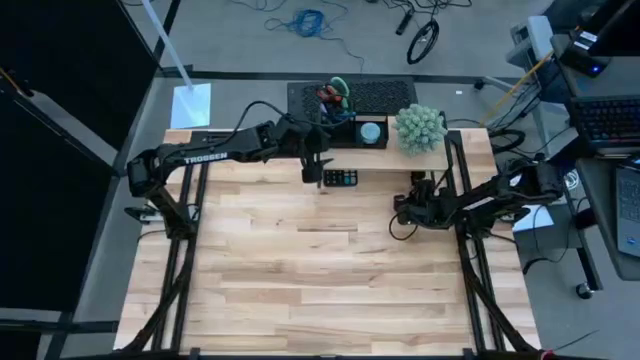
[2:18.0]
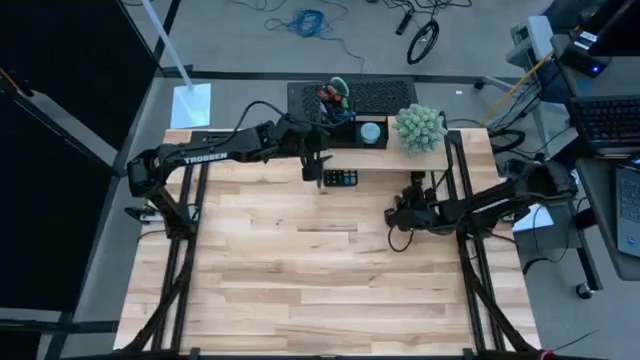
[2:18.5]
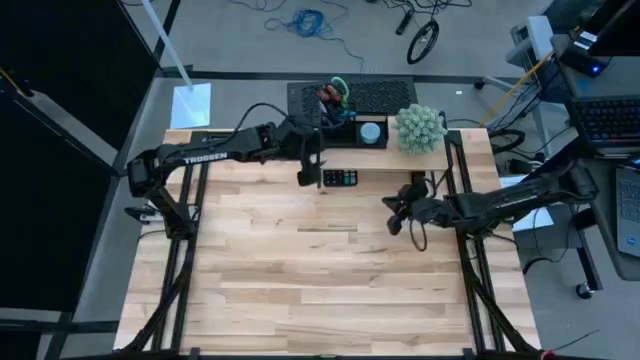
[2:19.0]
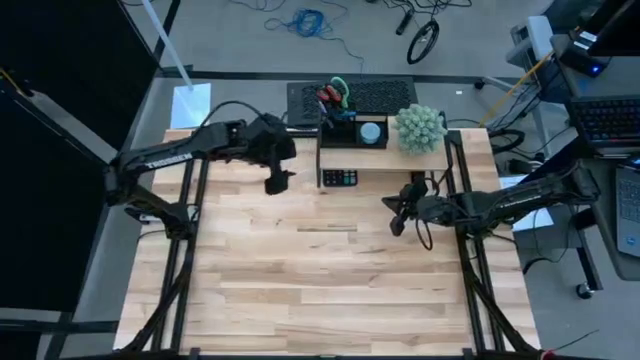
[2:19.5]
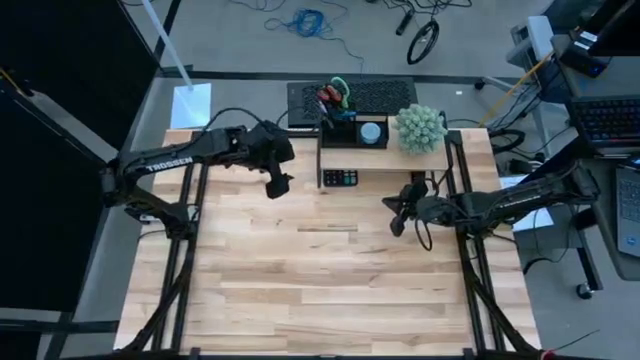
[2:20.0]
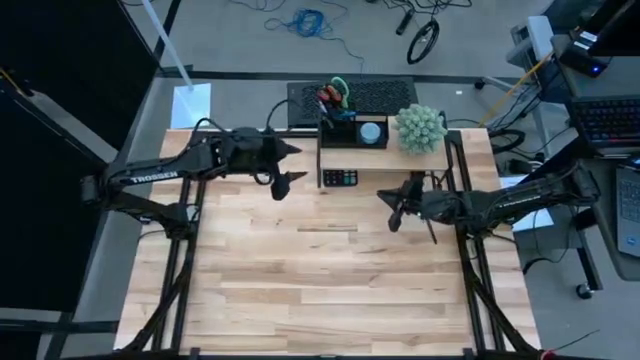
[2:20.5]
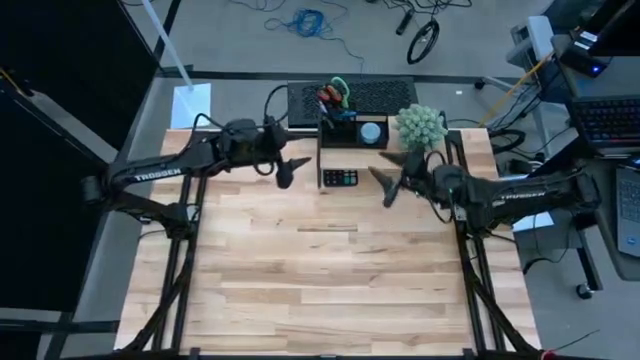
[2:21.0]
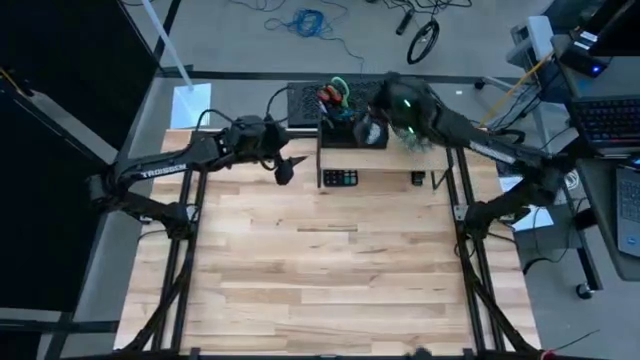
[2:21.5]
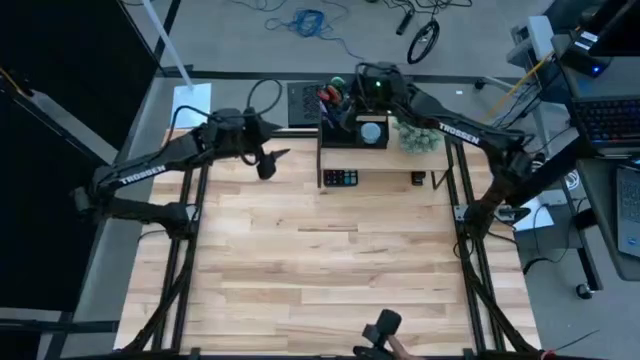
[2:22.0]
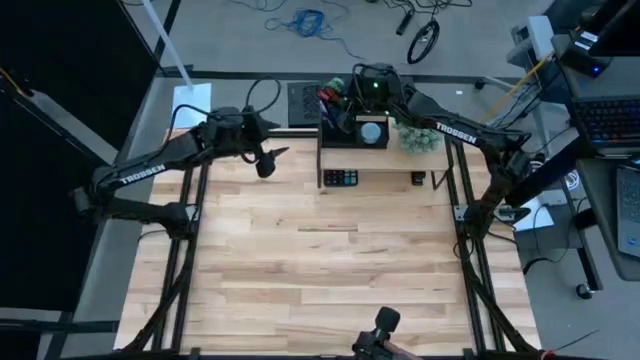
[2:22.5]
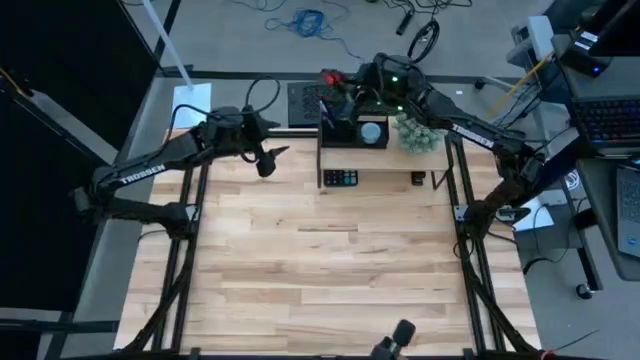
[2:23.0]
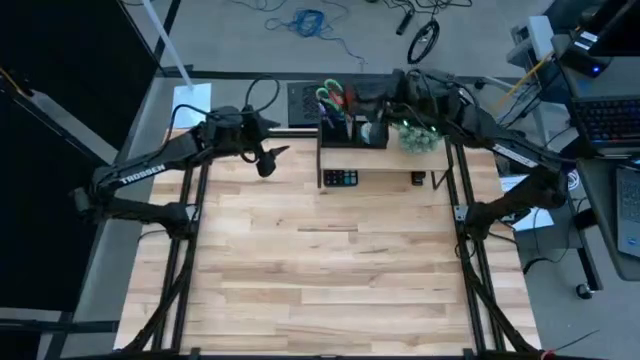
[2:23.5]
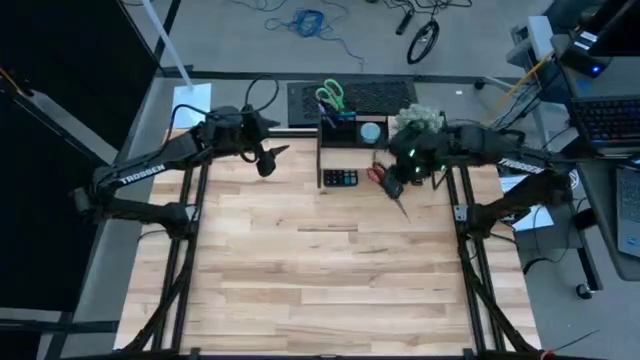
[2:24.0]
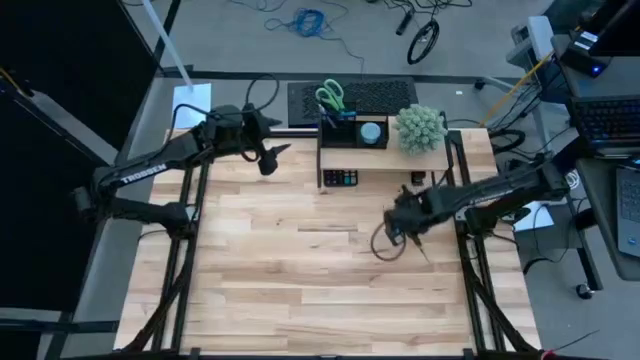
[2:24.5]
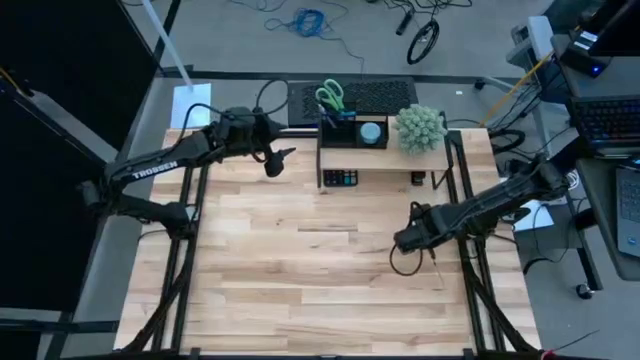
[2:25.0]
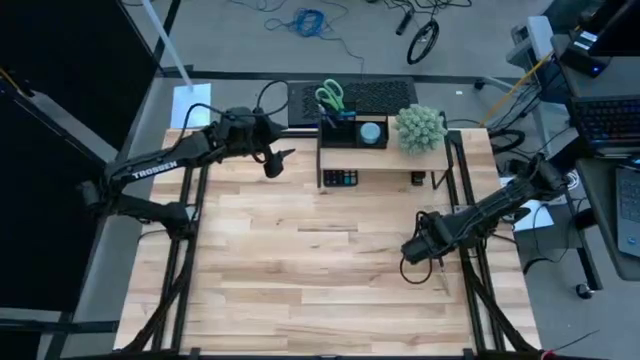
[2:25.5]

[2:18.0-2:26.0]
Task: Pick and place office supplies into organizer
Remove the black scissors from the desk organizer on the shelf

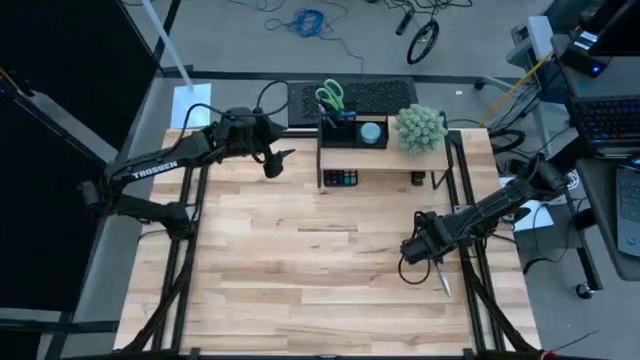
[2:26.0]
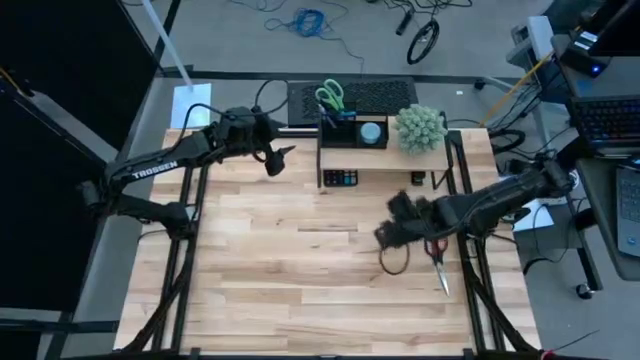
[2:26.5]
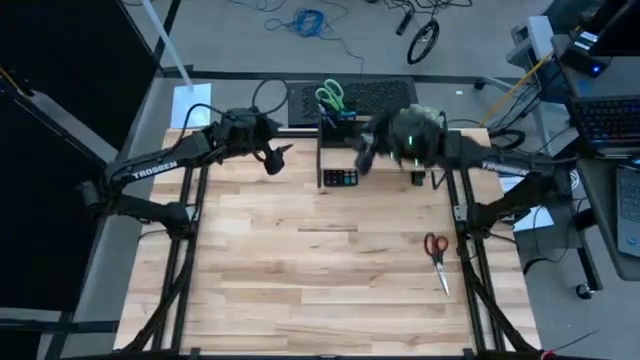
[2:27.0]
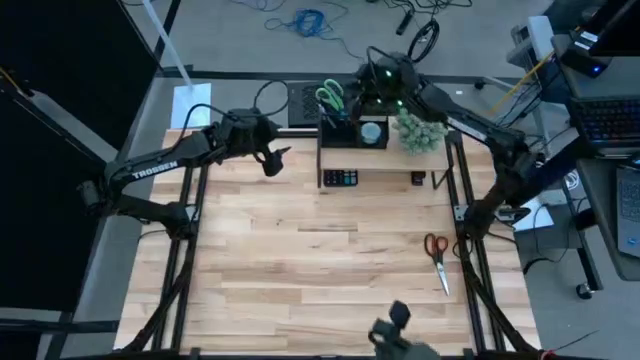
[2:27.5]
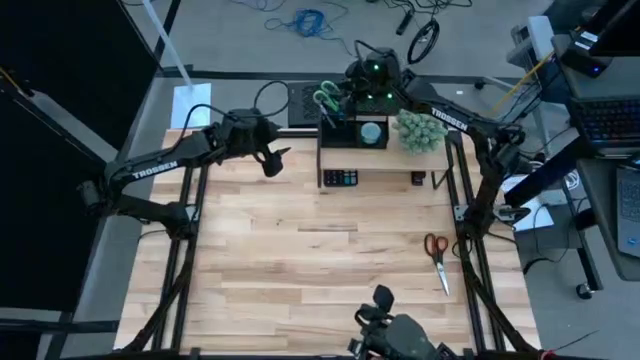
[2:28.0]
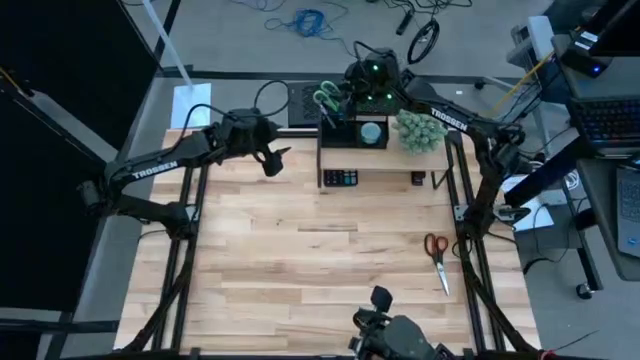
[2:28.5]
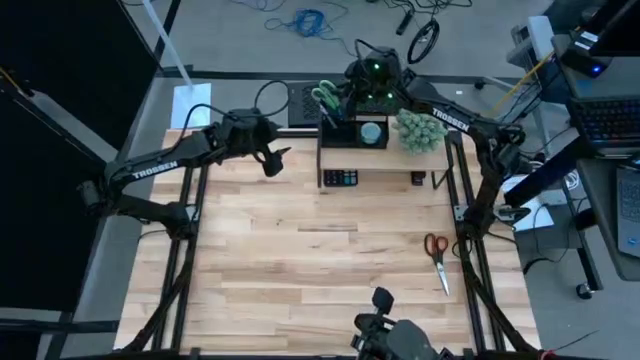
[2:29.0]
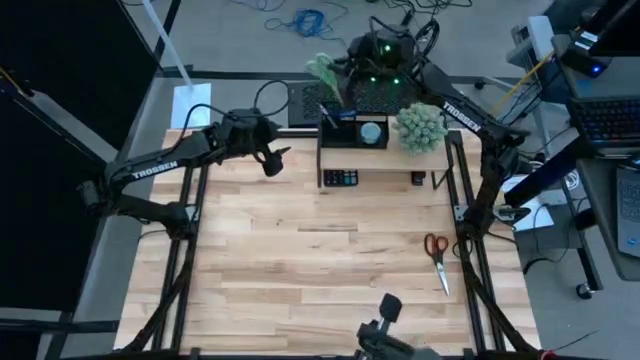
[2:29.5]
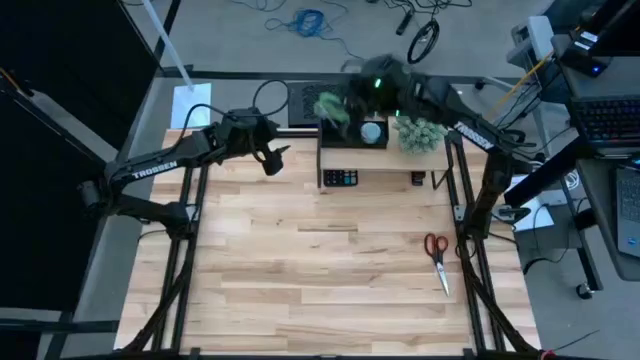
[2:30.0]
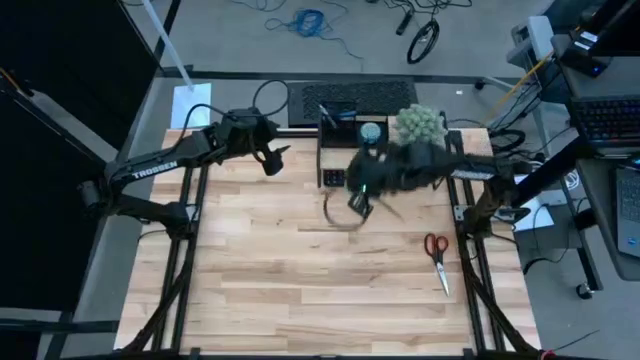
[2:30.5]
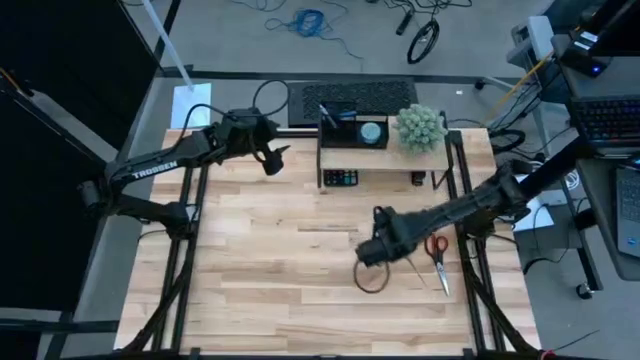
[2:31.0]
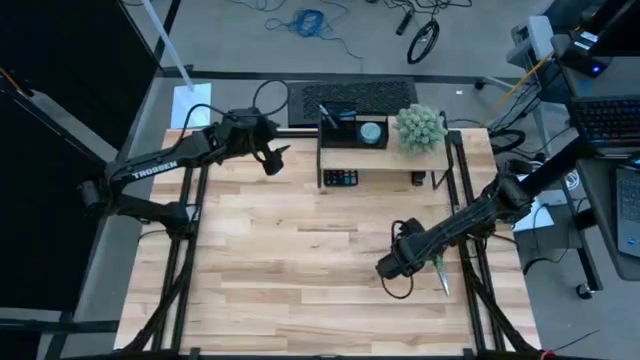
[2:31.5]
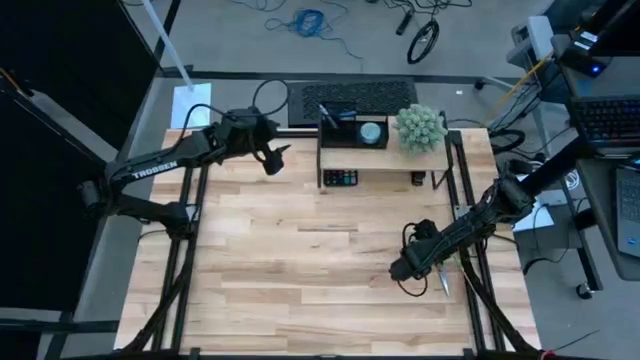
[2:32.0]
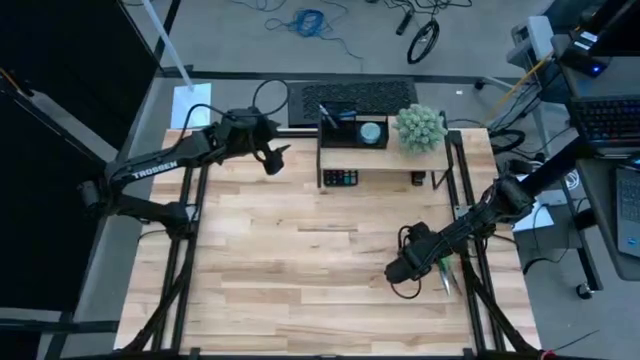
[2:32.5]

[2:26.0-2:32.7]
Remove the green scissors from the black desk organizer on the shelf

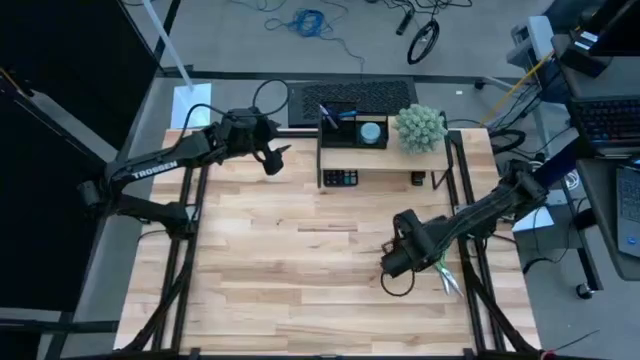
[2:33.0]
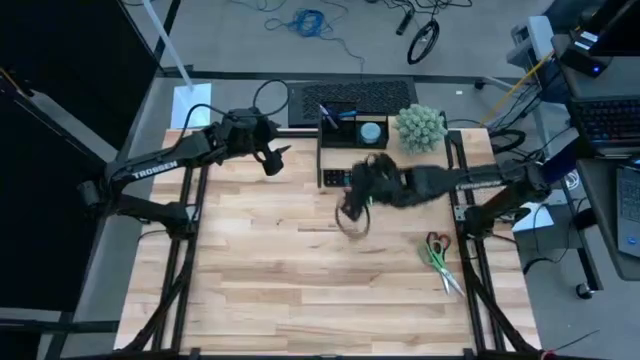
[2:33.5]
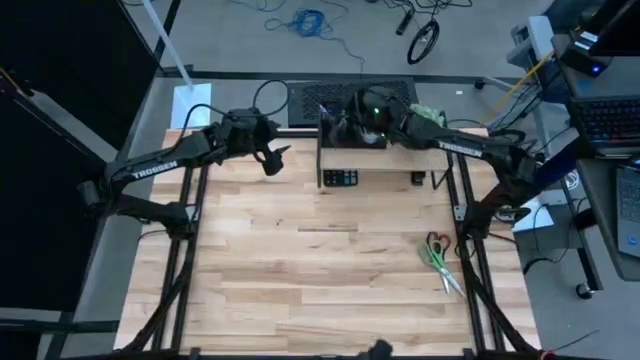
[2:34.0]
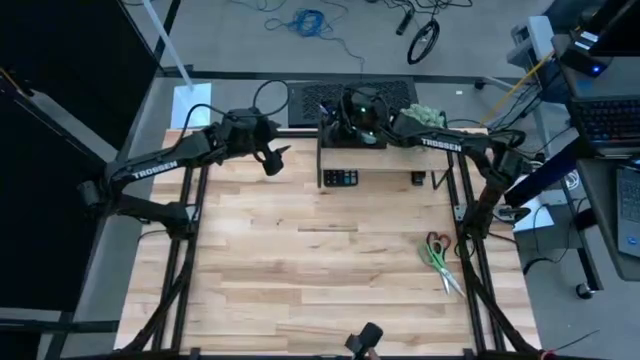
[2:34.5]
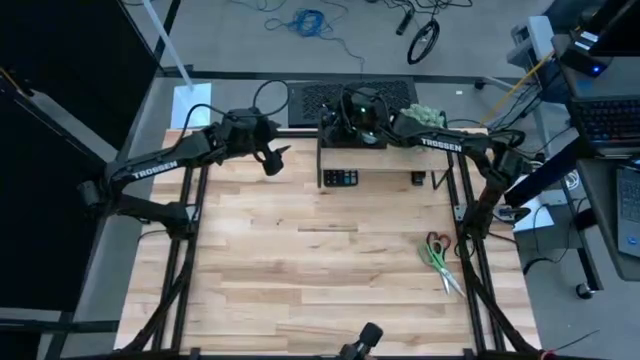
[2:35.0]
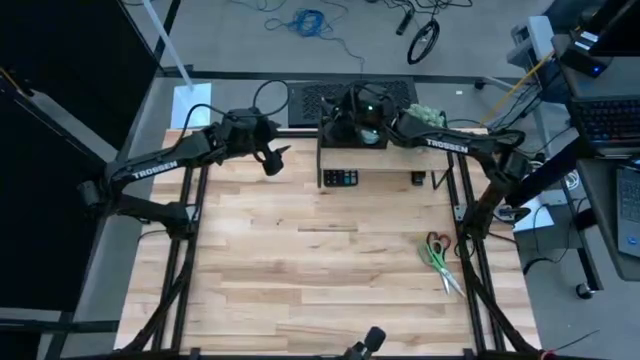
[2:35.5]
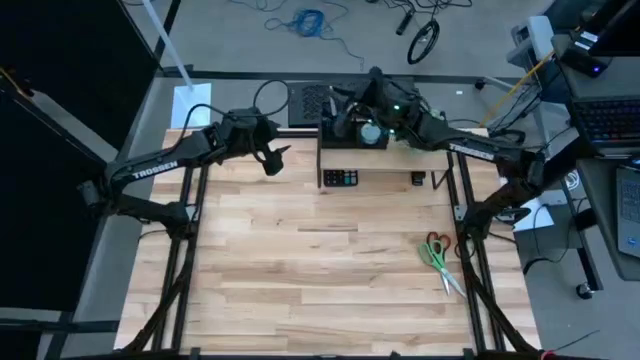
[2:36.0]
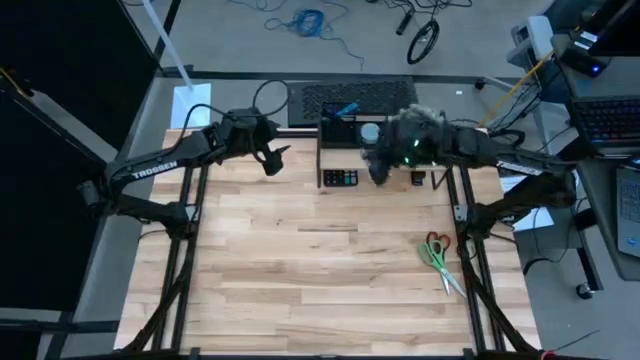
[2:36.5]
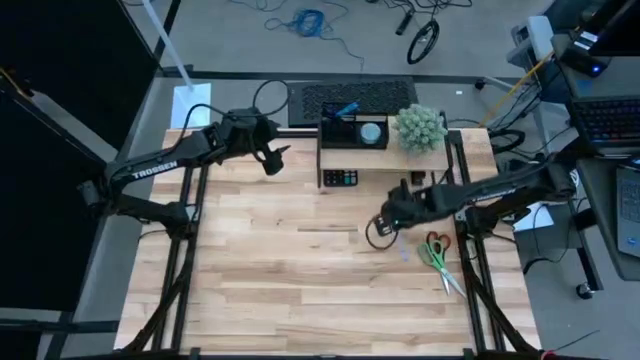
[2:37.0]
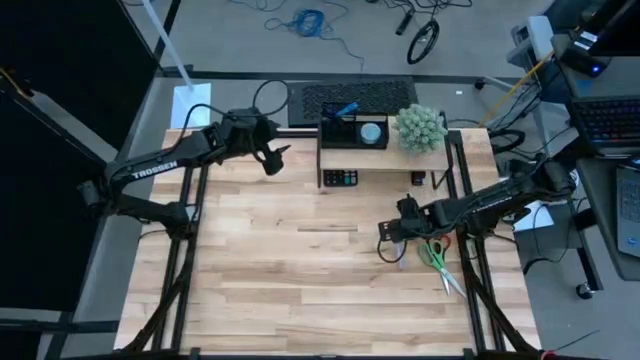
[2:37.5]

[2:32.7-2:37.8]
Remove the purple pen from the black desk organizer on the shelf
